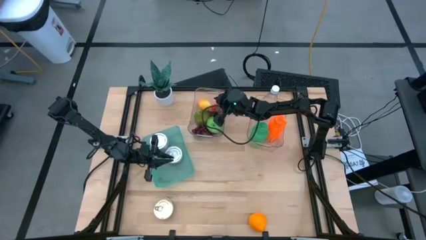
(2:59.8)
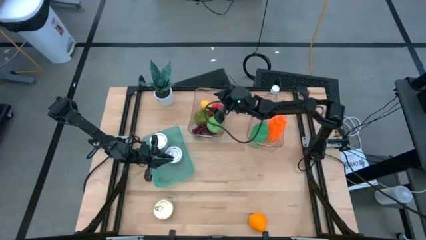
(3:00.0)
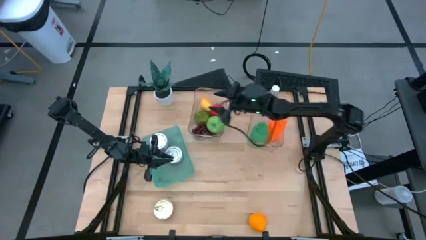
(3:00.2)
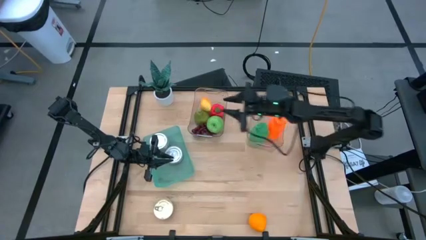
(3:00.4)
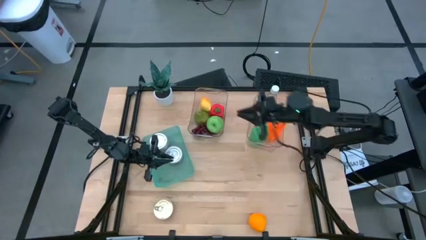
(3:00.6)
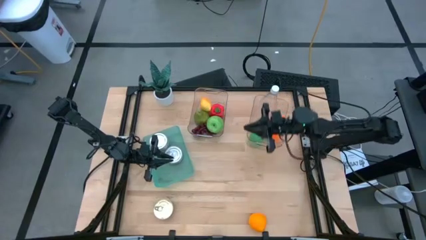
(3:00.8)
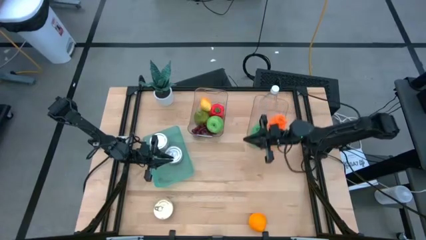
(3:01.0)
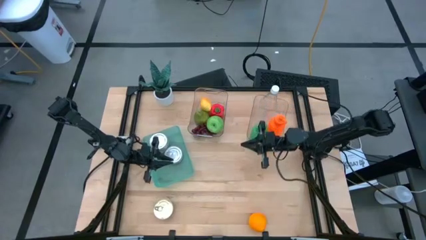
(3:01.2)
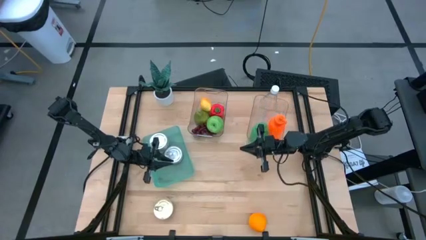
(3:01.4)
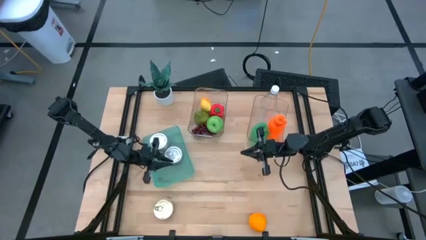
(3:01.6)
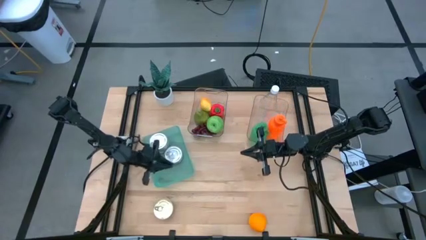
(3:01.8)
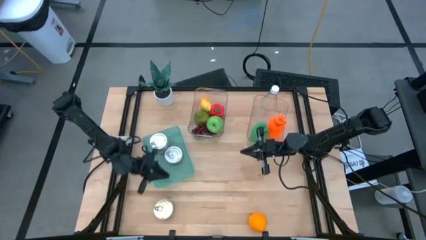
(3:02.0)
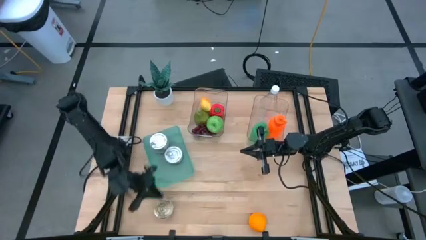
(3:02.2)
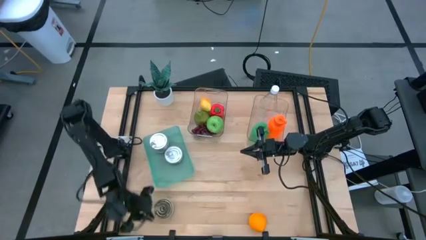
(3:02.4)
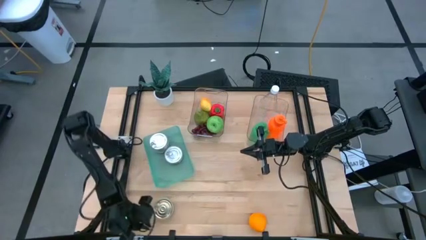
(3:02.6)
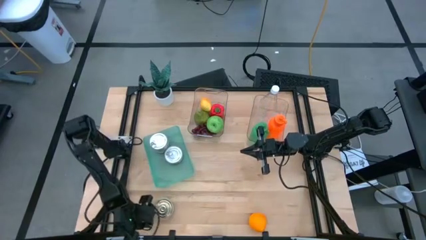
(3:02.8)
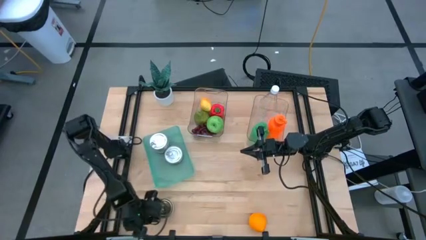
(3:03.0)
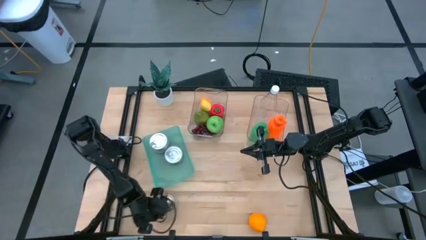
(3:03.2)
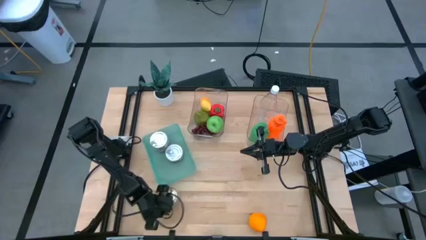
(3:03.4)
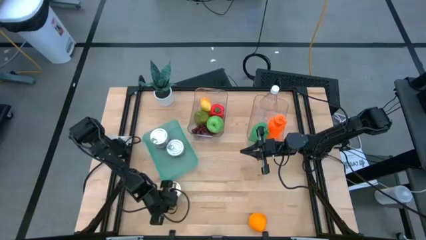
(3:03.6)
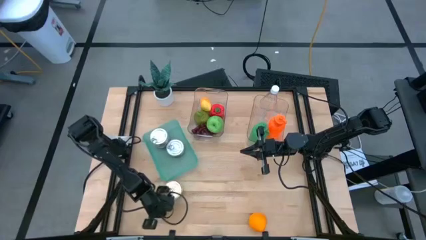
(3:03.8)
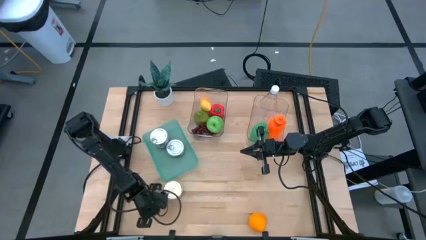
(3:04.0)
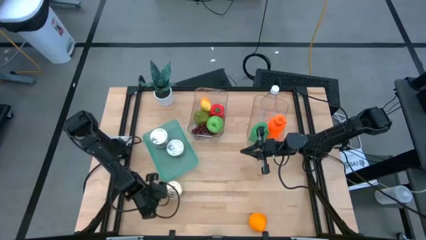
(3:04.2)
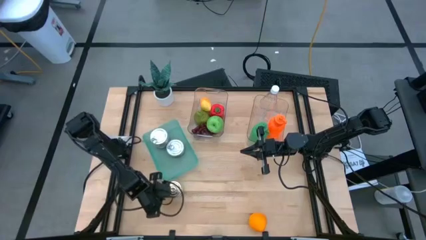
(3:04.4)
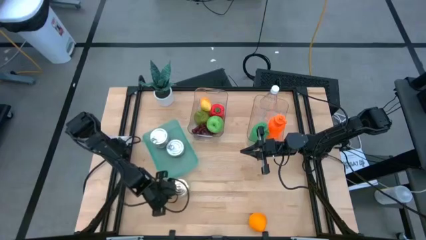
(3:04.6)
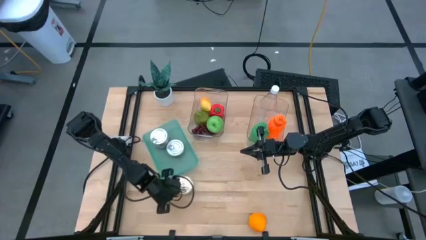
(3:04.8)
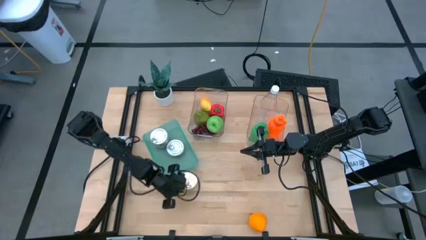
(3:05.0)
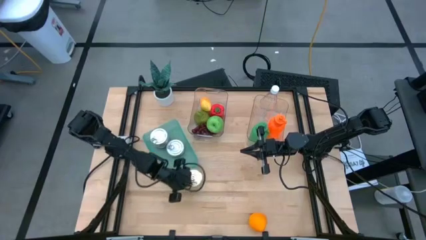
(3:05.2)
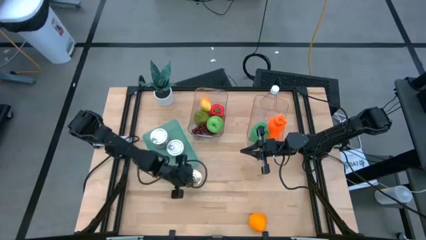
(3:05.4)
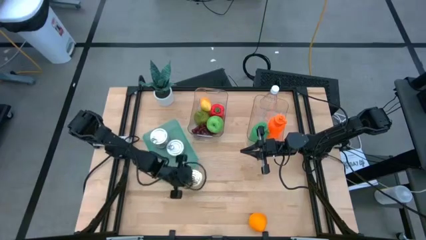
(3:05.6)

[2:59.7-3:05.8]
Task: Pick & Place Food Item
Adjust the blue and pink tuna can

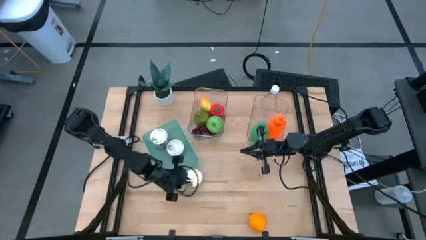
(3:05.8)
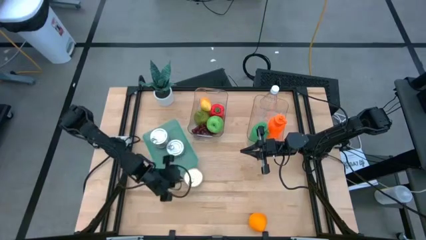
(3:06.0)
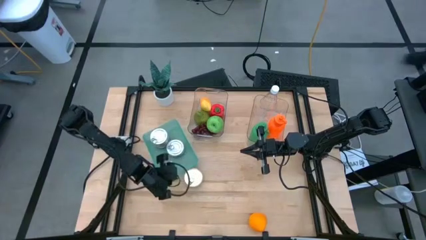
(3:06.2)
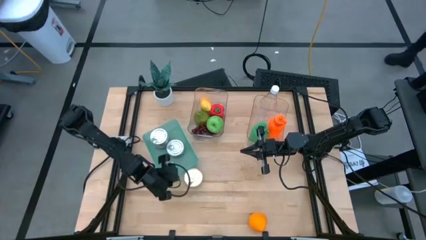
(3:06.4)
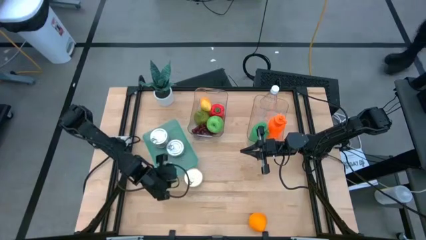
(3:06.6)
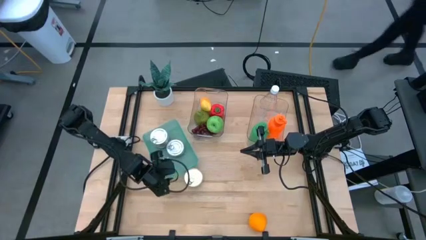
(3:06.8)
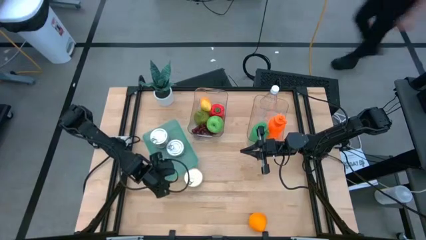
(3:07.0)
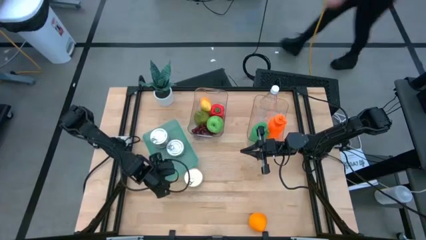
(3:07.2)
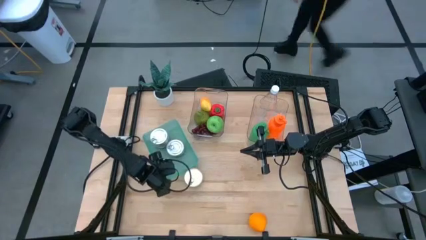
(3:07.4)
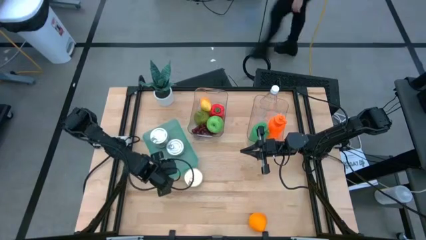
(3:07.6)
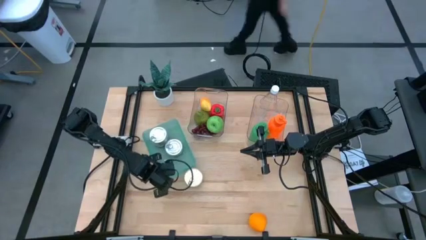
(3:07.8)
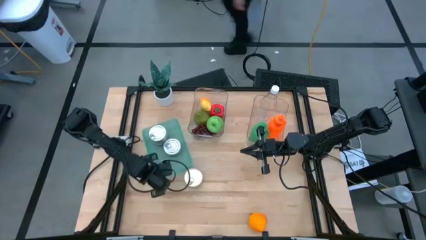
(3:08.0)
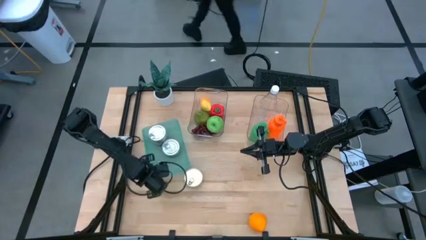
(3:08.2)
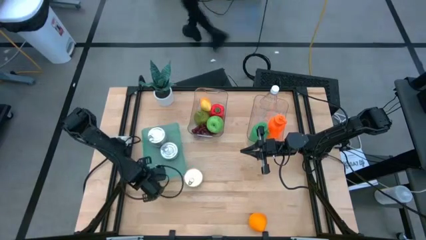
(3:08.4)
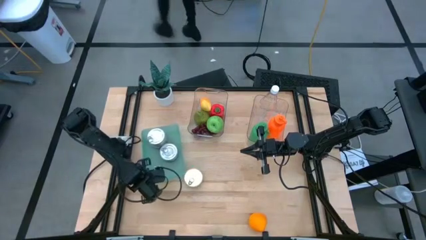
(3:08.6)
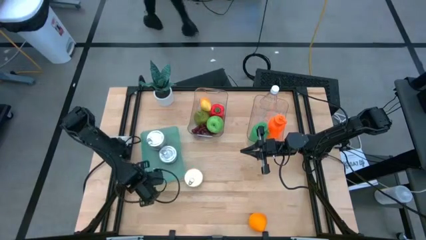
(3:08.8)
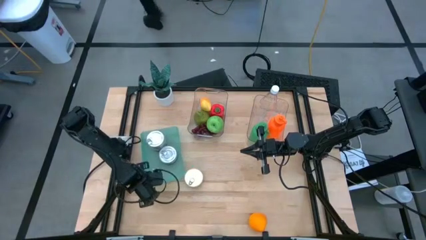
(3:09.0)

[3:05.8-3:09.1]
Adjust the green bin
